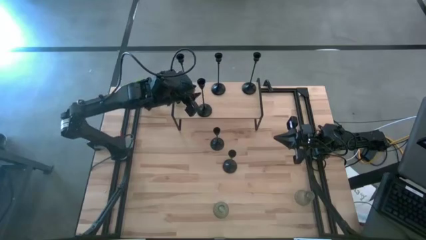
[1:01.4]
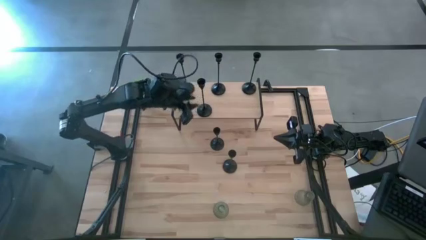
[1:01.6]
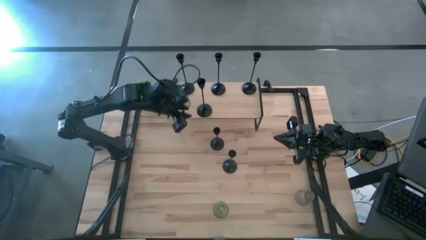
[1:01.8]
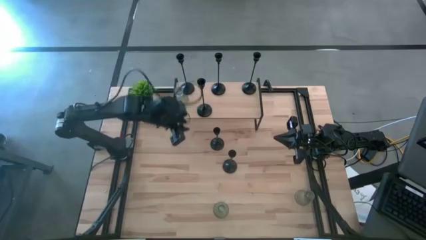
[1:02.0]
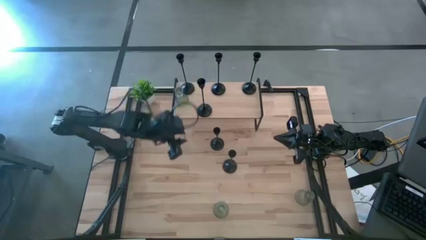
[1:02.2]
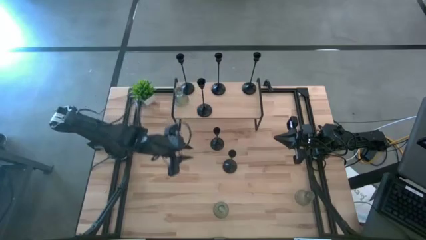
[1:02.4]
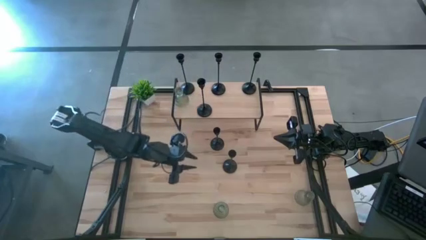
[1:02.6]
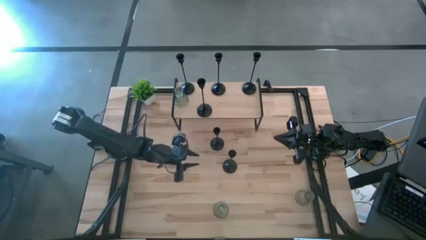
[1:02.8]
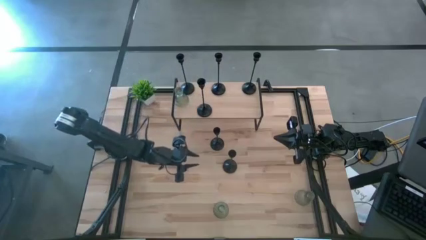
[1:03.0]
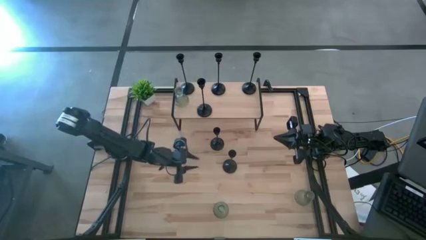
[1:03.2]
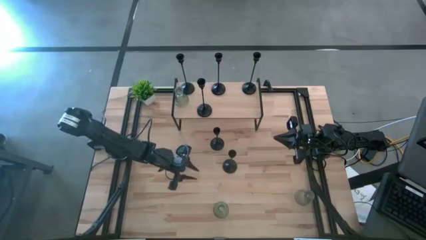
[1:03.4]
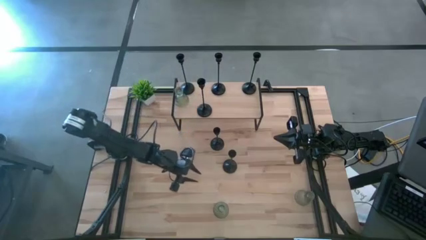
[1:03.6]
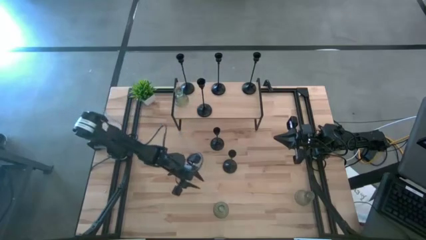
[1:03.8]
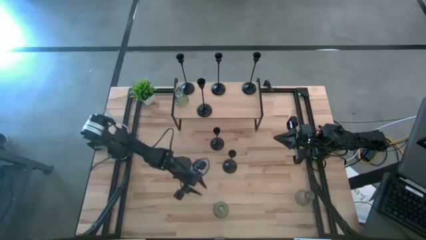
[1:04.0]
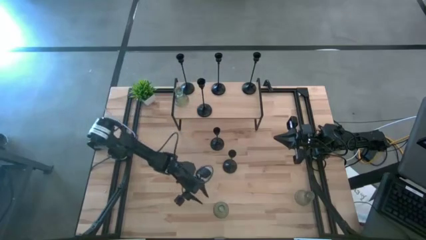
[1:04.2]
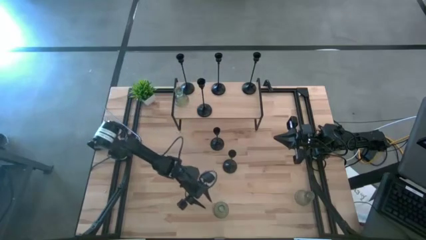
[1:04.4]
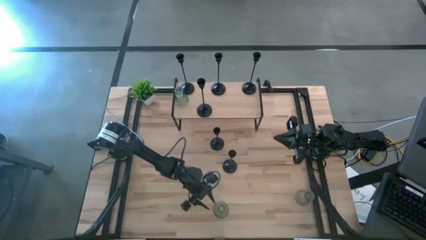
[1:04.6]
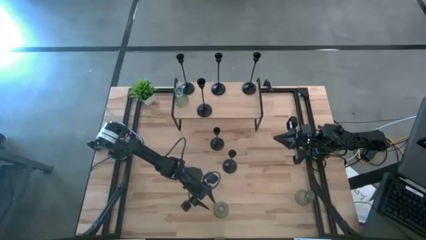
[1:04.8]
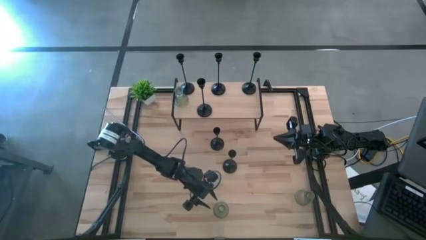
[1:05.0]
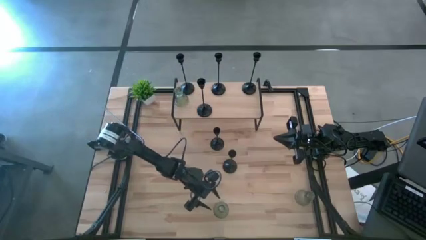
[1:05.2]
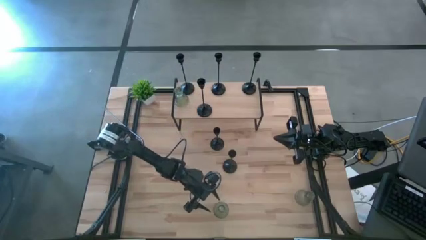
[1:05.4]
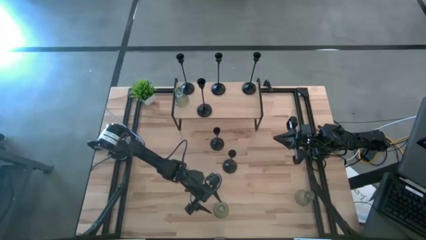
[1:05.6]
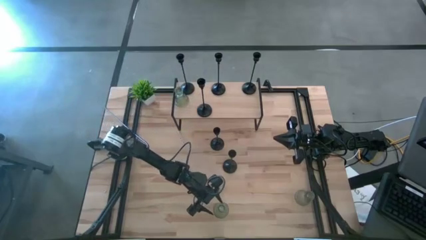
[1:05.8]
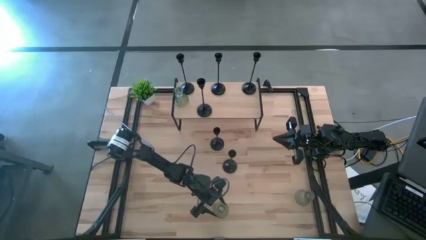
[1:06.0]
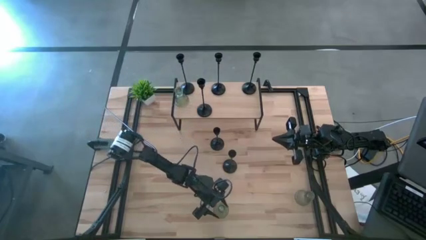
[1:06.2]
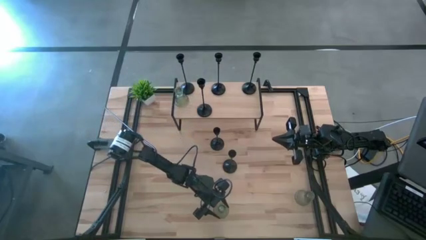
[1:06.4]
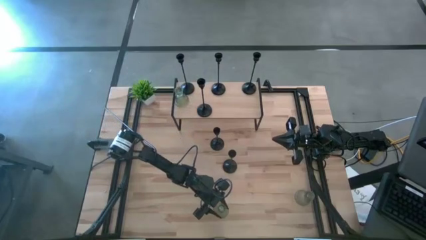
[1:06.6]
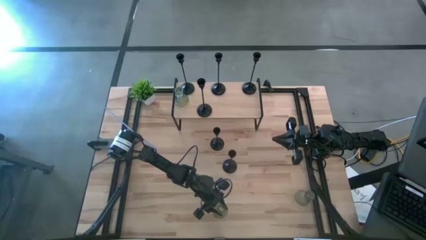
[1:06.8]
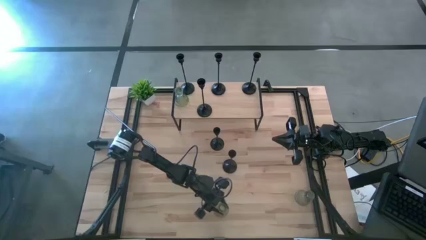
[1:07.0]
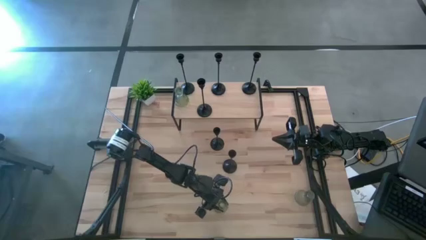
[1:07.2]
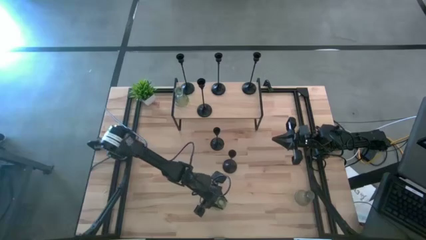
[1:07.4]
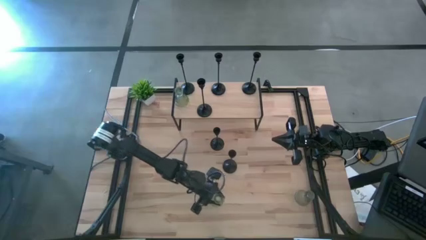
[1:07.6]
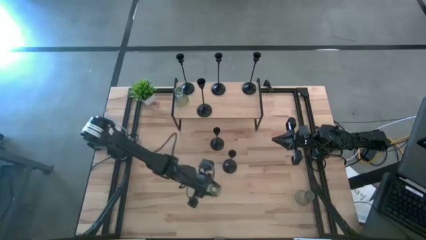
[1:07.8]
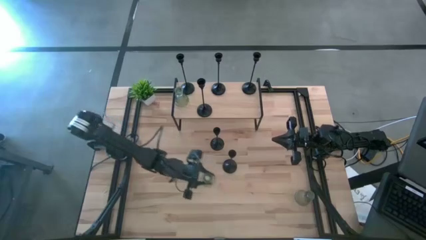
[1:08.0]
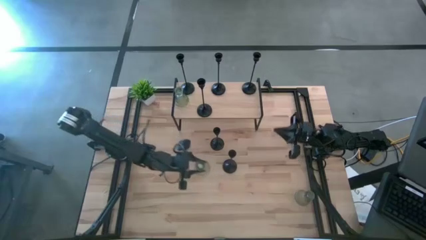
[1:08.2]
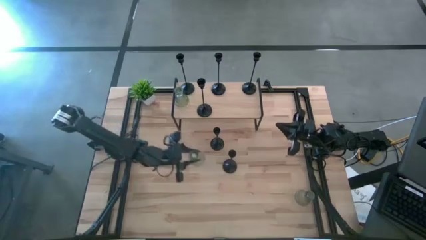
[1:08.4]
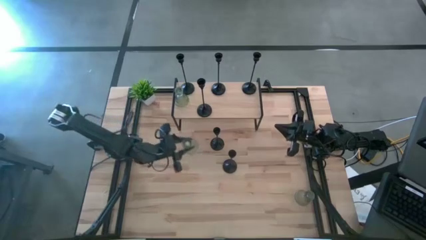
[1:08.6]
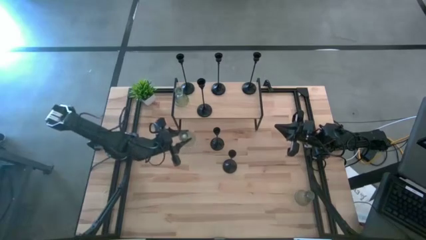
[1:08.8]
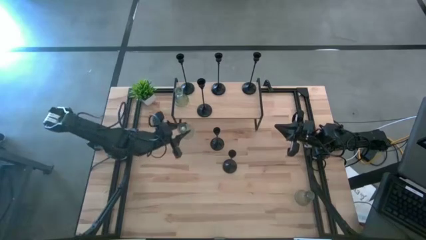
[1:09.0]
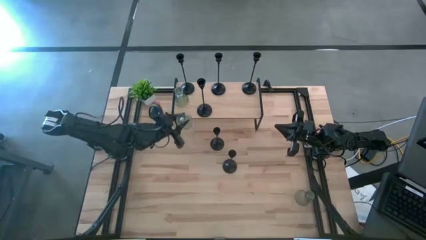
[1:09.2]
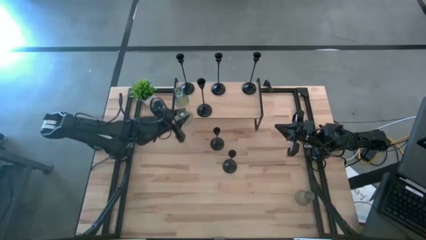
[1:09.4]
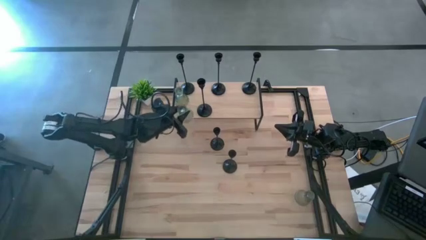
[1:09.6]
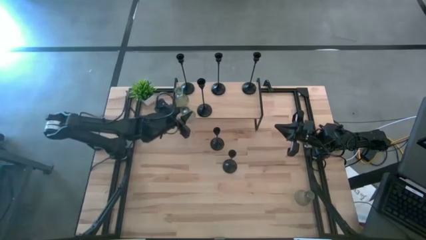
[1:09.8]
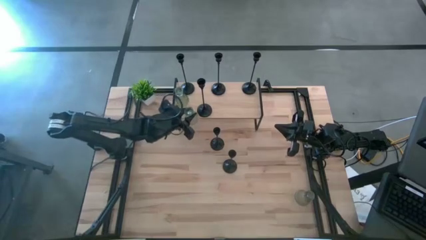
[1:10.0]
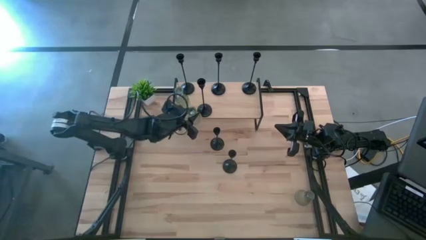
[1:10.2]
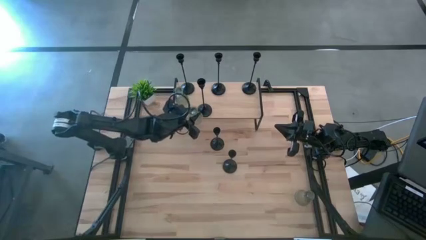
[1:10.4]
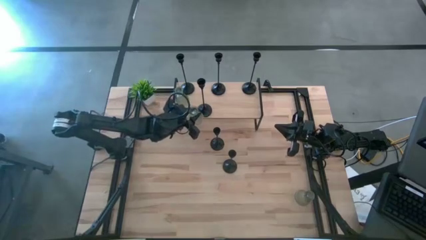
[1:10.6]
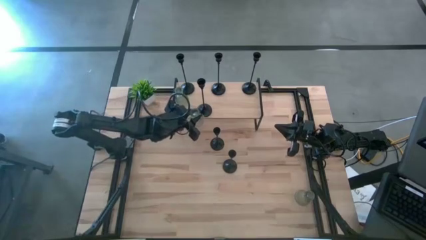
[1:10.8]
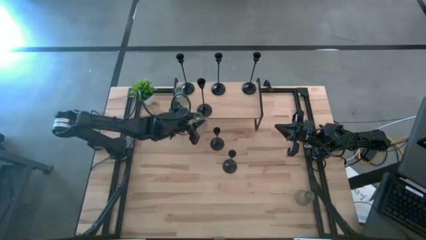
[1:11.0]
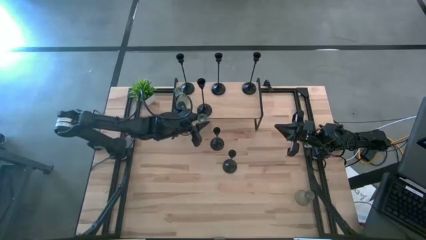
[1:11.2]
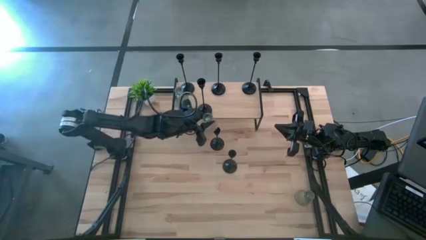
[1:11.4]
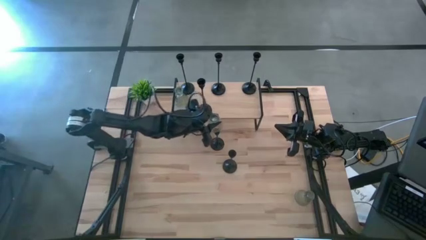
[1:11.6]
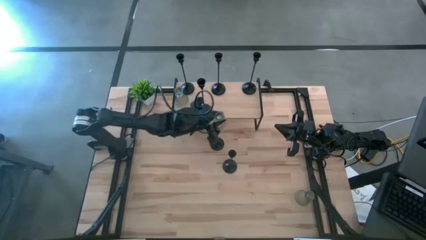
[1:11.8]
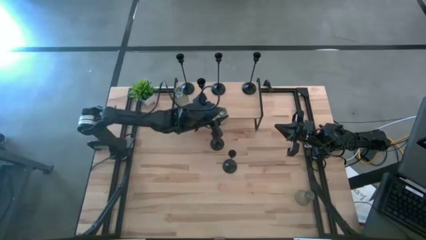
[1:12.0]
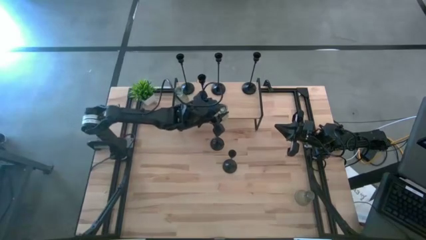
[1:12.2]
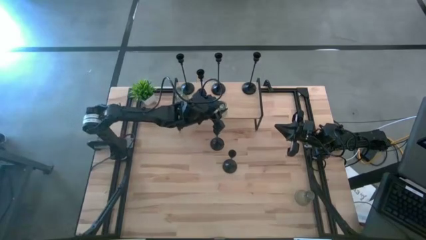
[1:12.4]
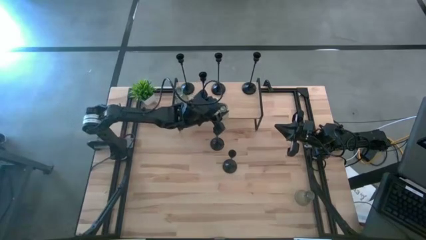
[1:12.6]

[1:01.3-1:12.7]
Task: Pick & Place candle stick holders
Put the green candle holder on the shelf

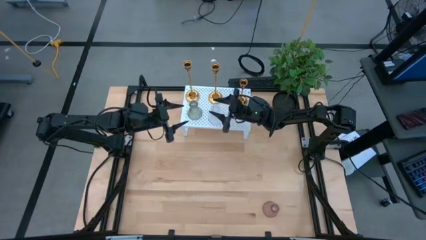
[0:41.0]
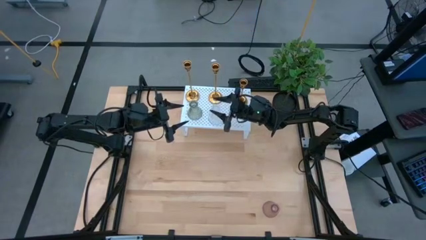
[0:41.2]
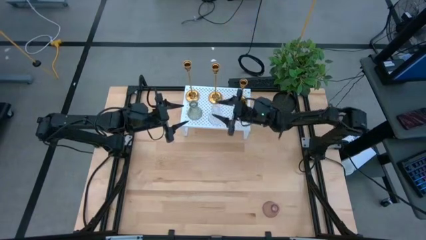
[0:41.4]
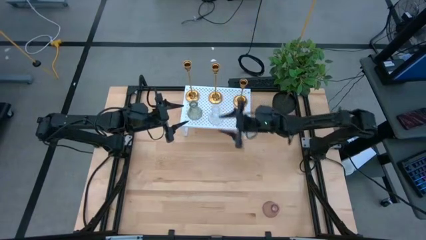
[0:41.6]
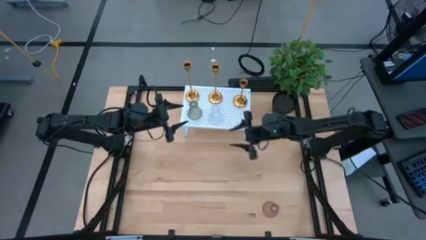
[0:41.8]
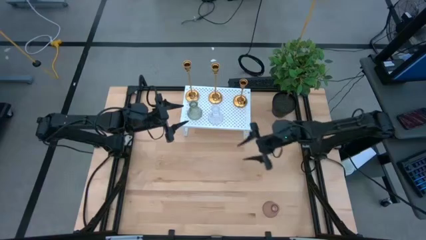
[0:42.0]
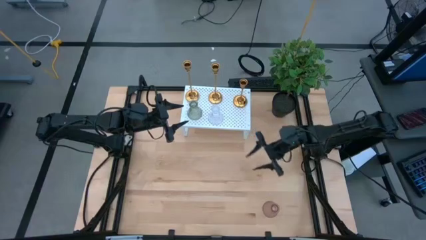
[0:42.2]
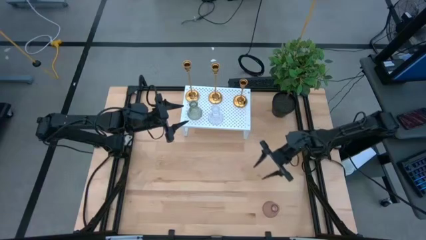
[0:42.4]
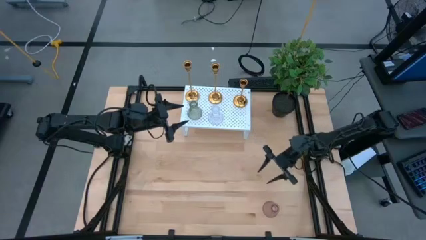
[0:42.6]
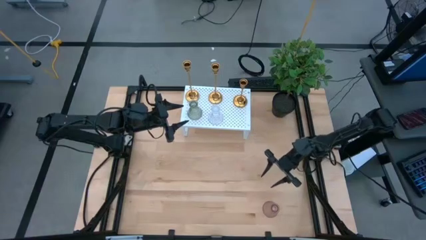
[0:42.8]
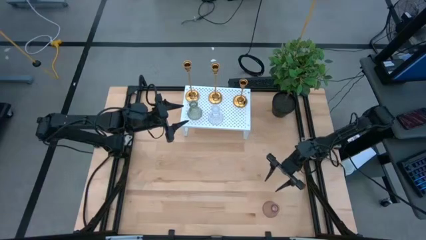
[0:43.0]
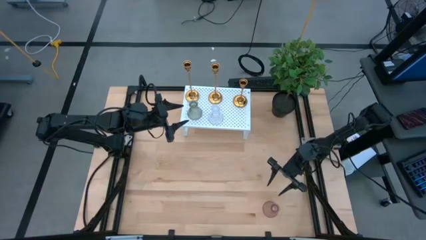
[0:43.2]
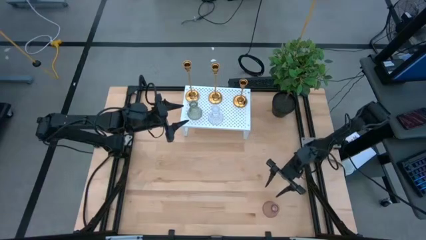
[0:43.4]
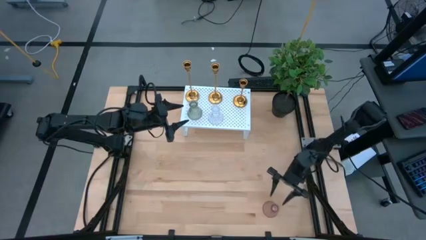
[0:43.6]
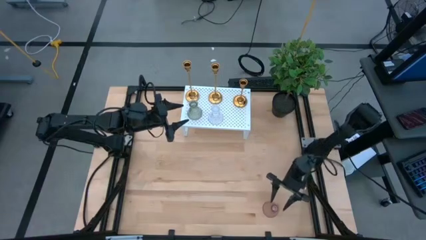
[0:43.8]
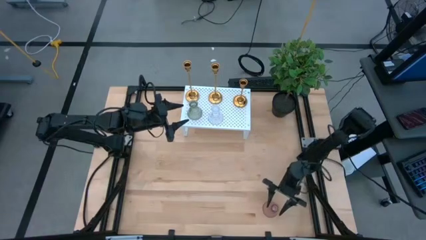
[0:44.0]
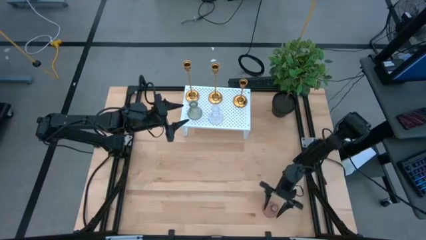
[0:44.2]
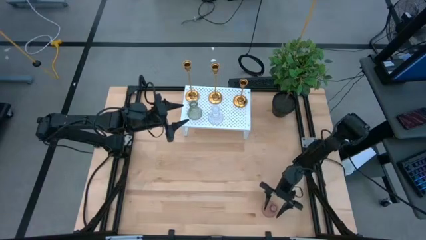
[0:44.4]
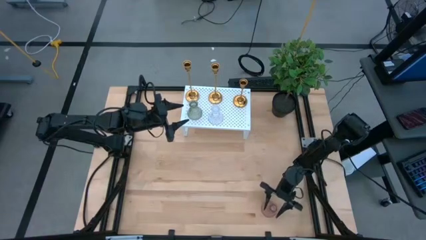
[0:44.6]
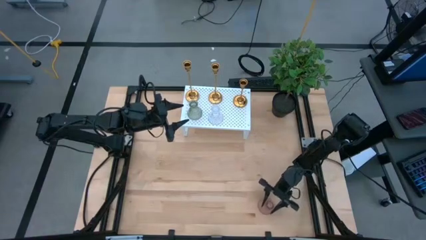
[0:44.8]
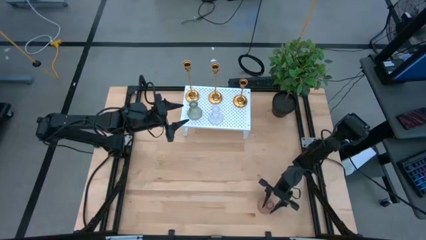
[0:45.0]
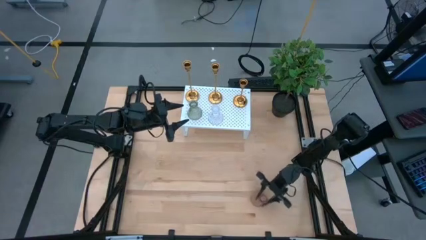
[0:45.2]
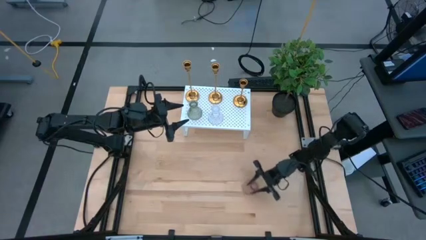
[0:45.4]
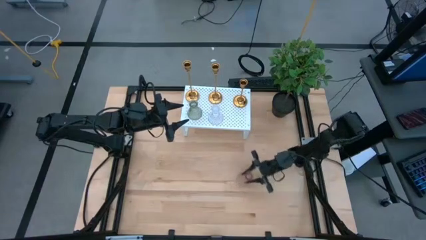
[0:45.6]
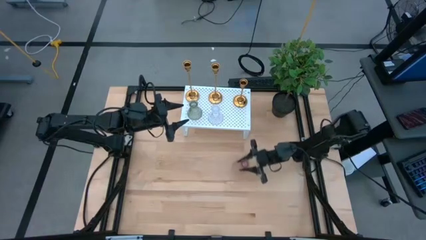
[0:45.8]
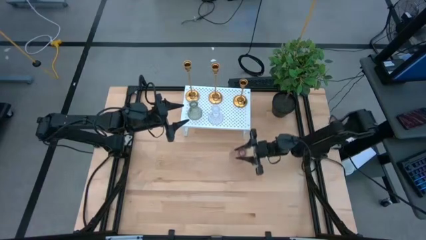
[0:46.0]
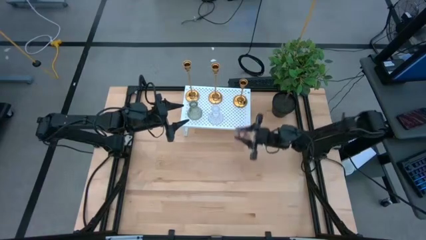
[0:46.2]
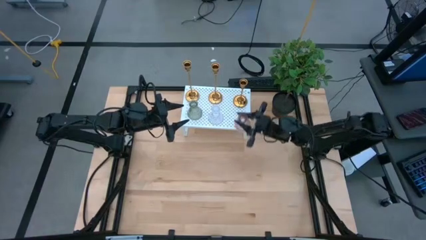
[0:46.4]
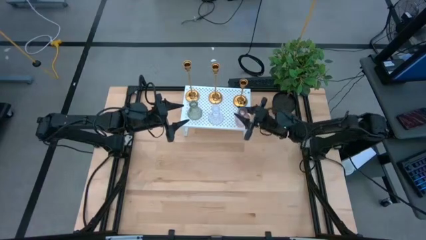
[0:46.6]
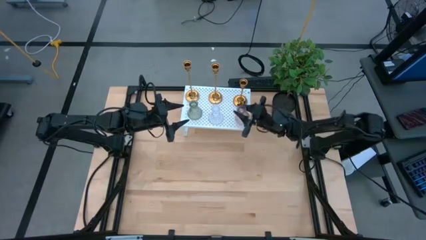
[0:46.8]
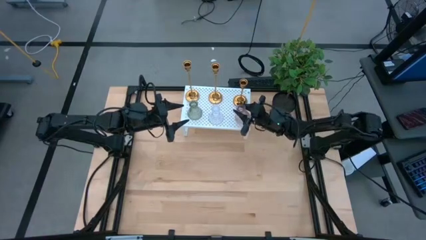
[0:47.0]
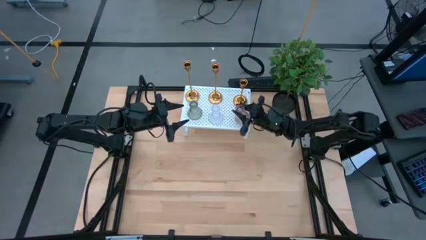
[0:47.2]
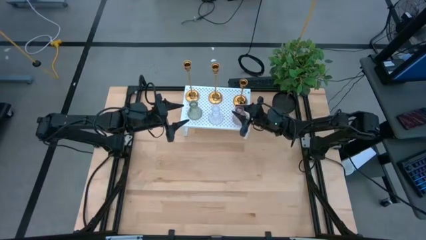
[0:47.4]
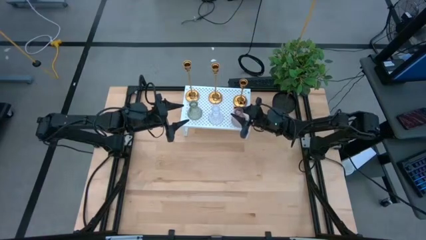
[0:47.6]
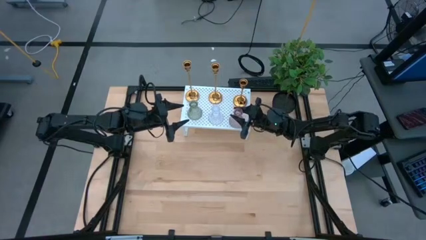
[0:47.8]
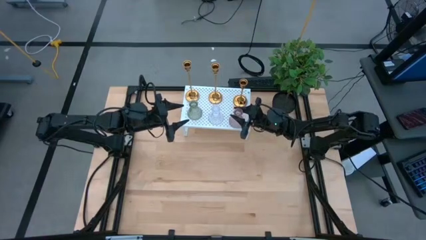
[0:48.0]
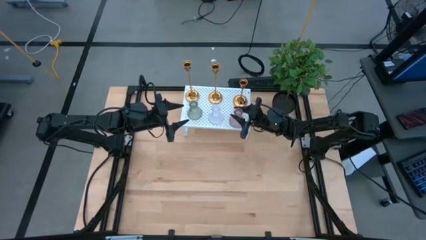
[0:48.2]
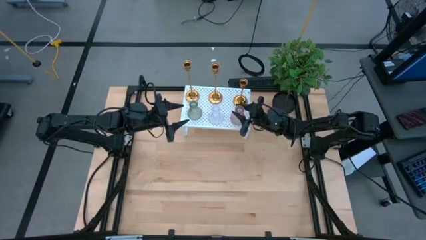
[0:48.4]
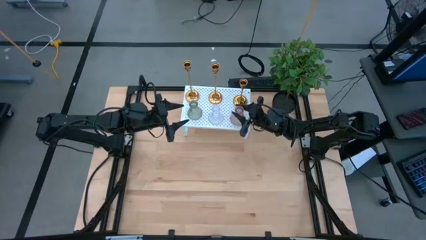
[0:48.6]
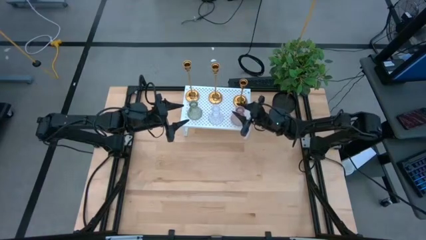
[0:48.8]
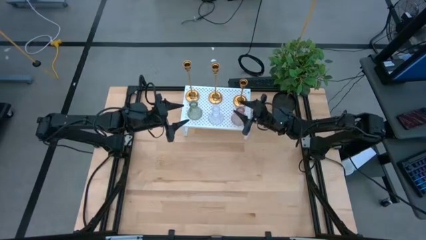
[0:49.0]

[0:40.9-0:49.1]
Task: Pick & Place candle stick holders
Put the red glass candle holder on the shelf aligned with the other glass candle holders
